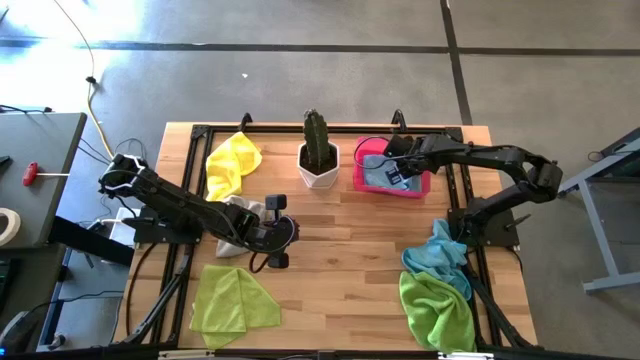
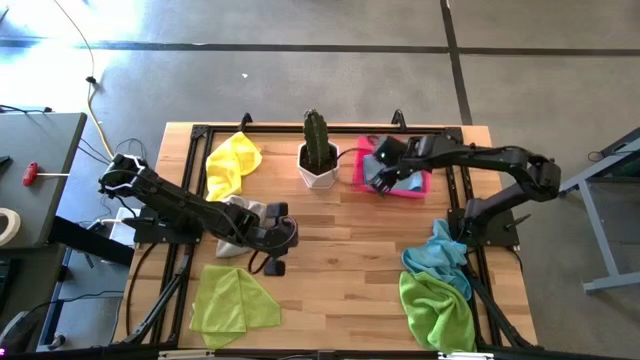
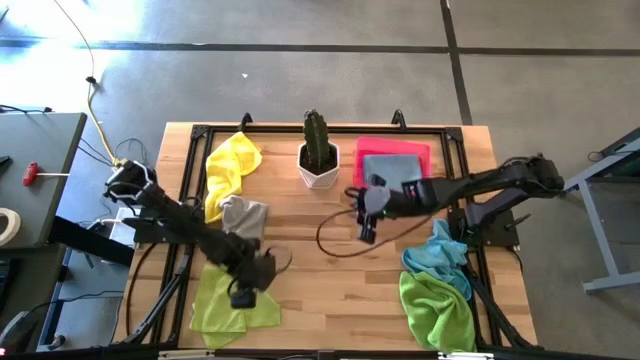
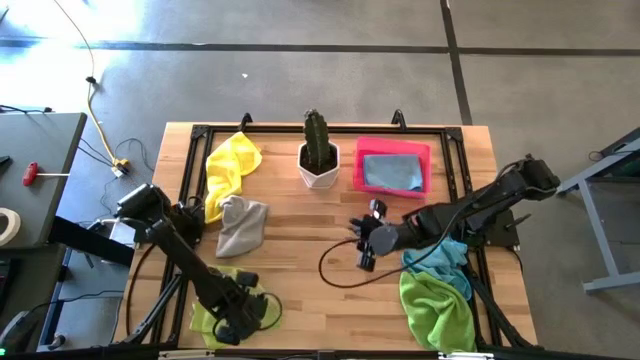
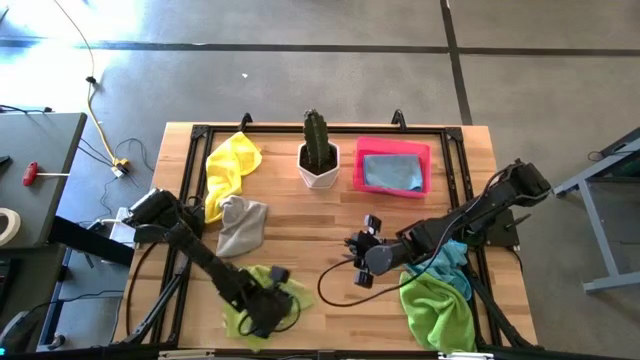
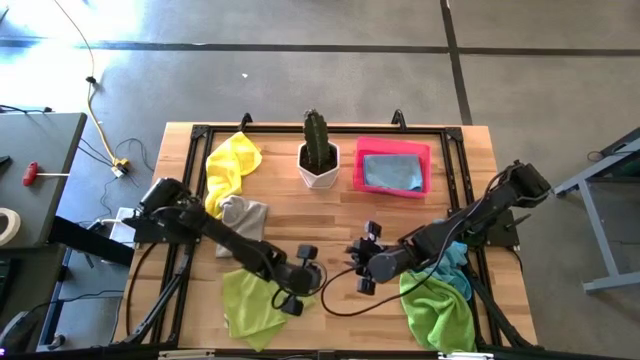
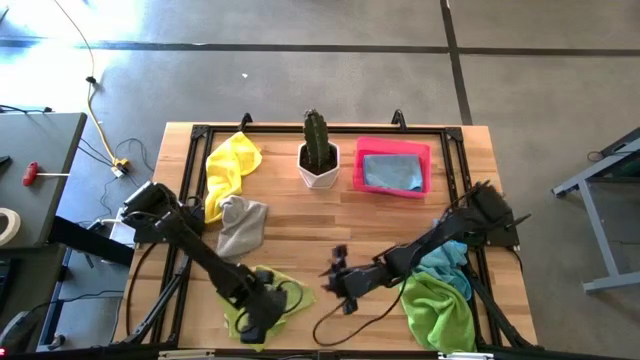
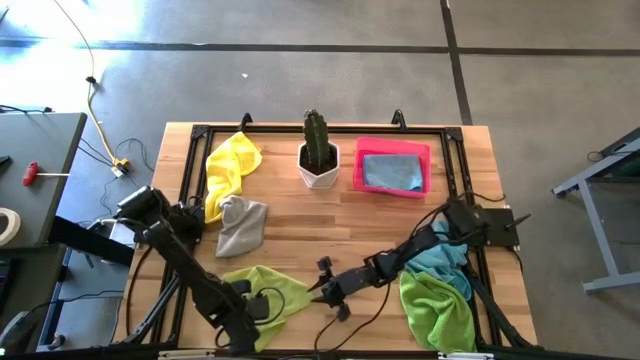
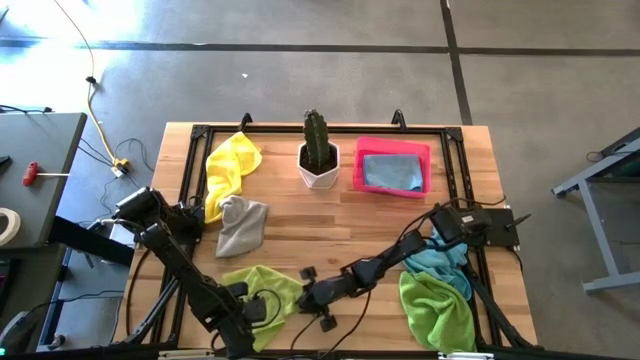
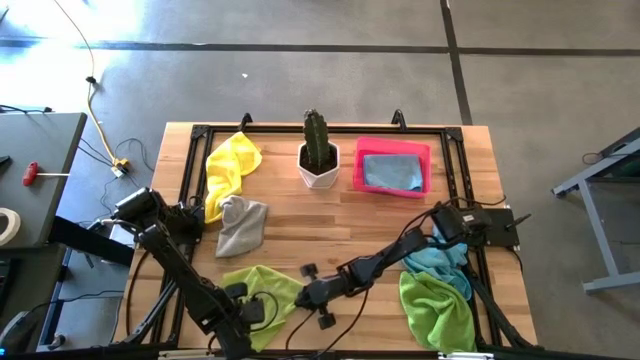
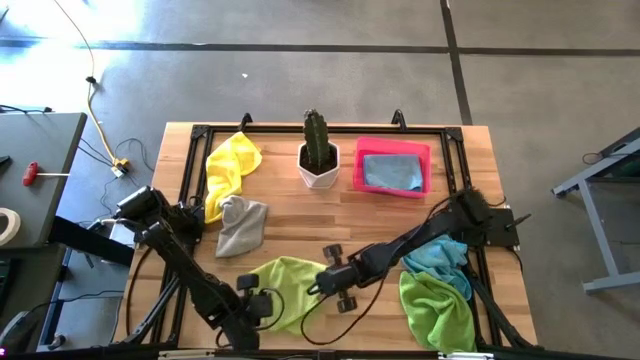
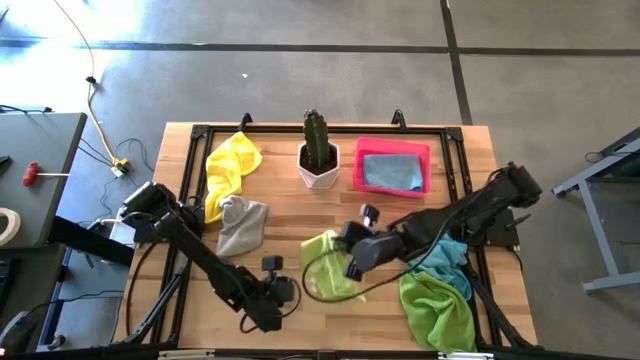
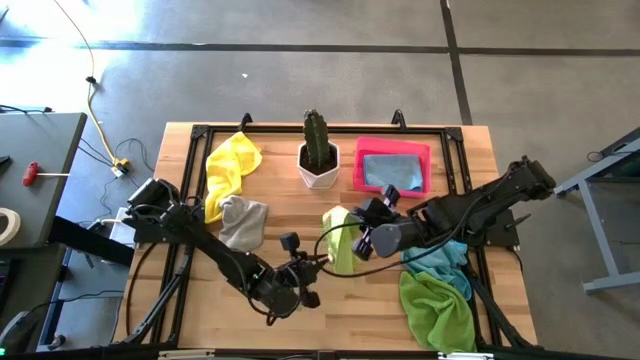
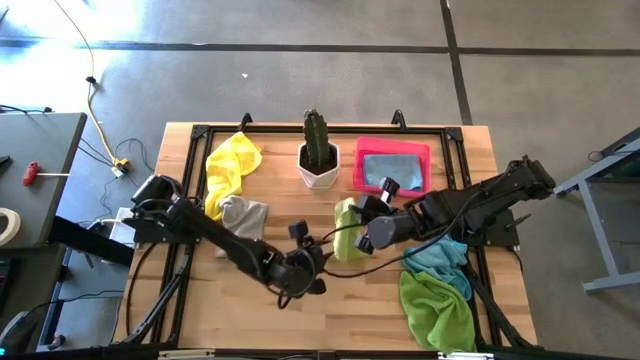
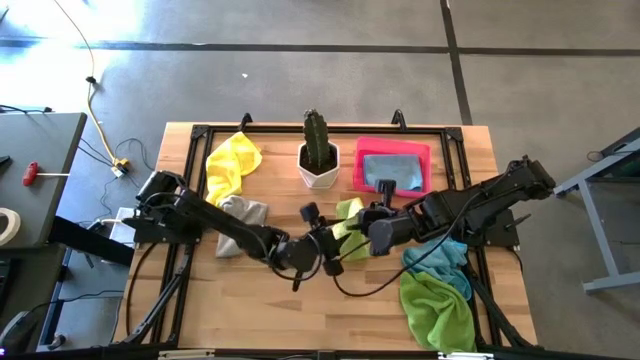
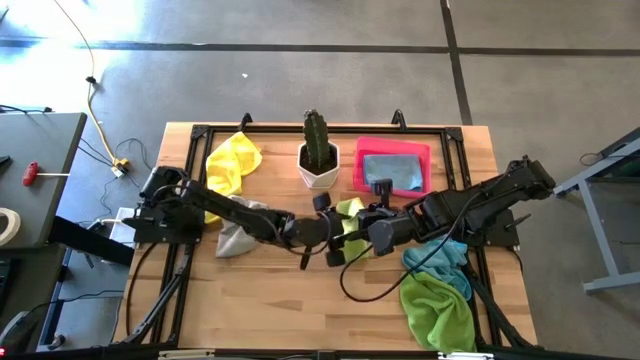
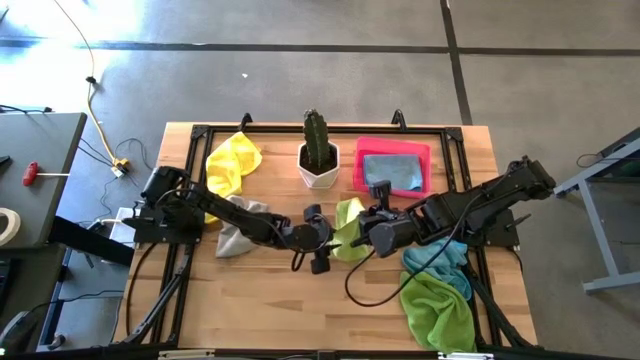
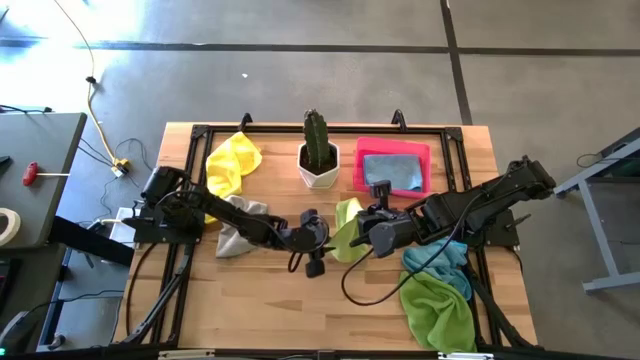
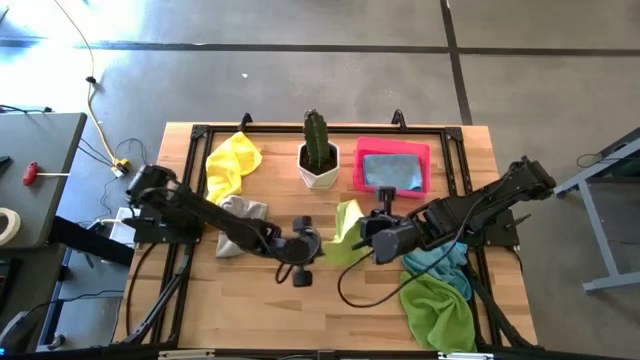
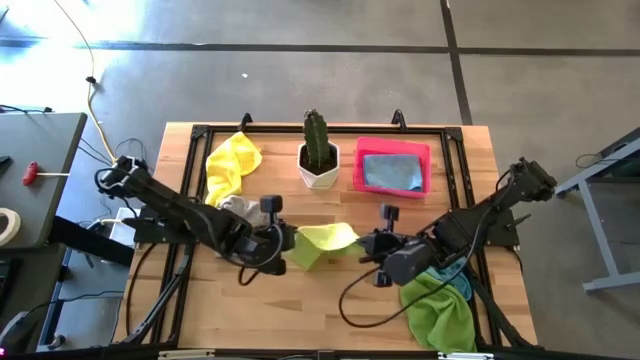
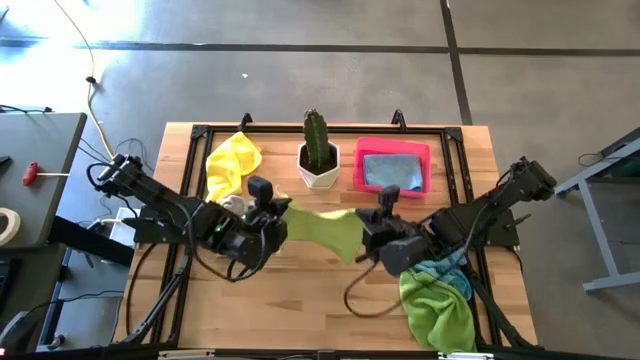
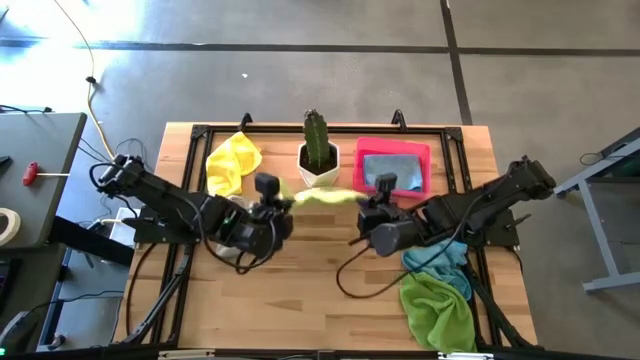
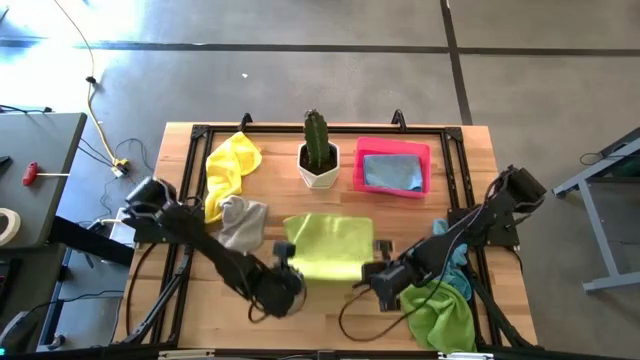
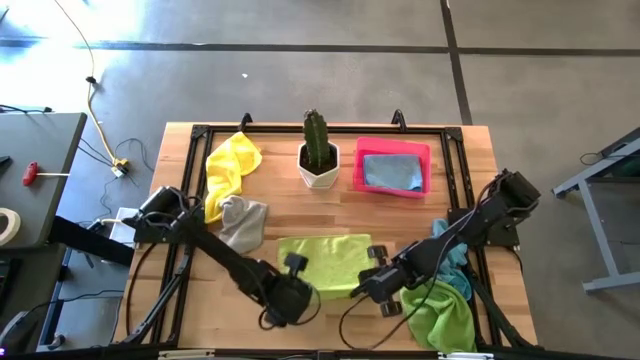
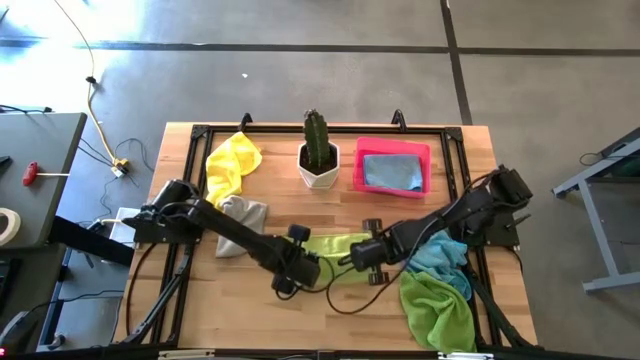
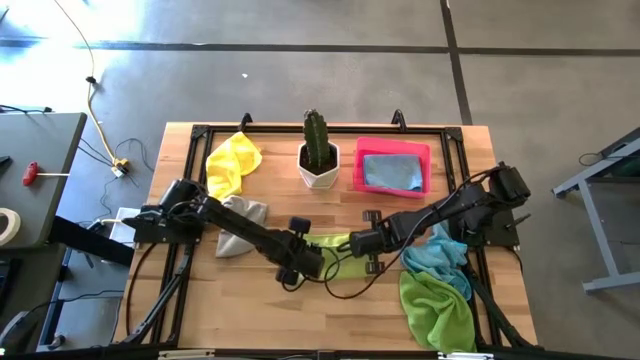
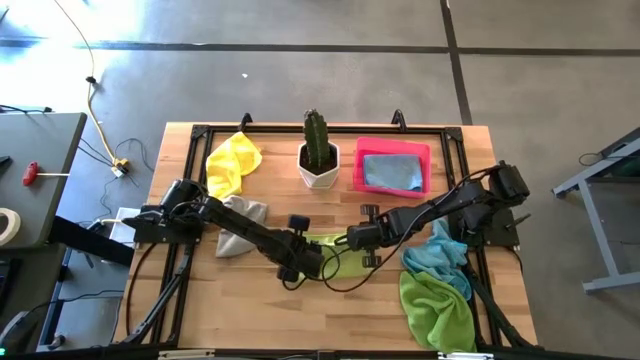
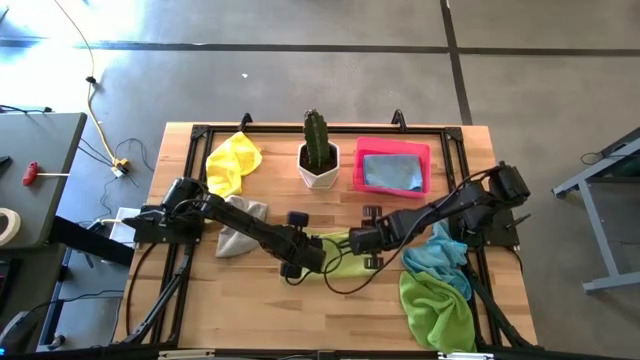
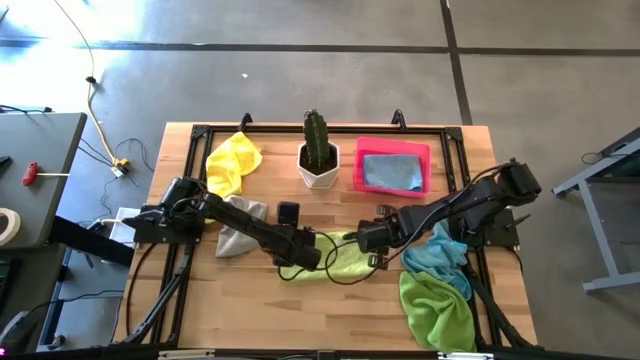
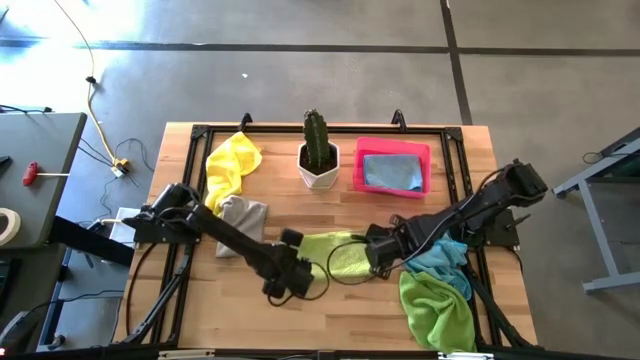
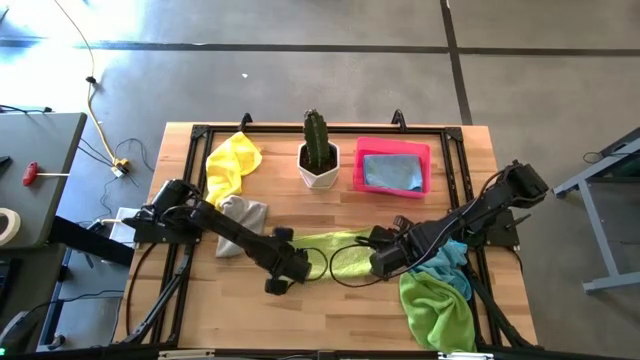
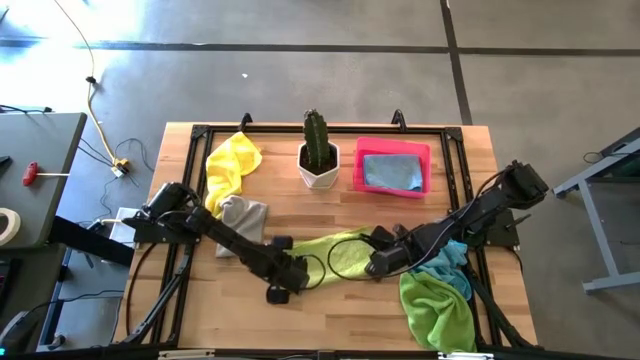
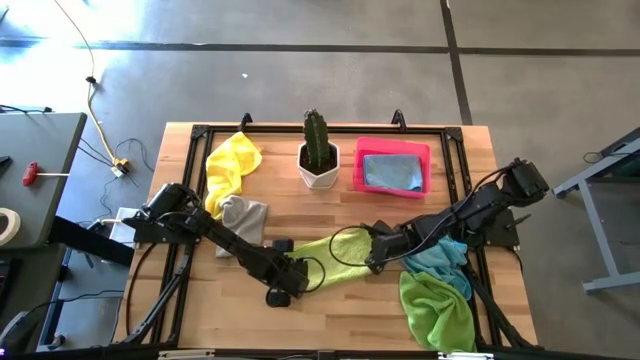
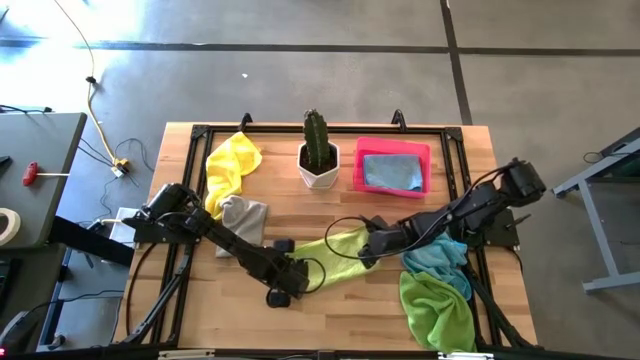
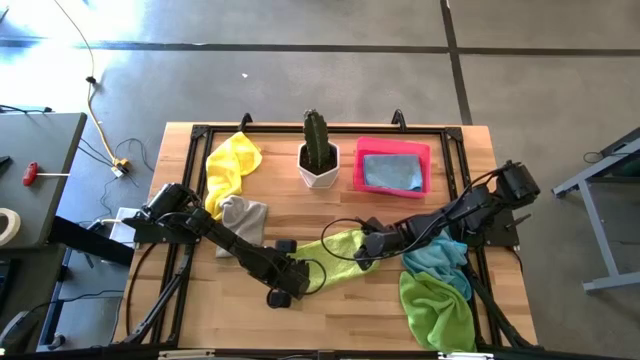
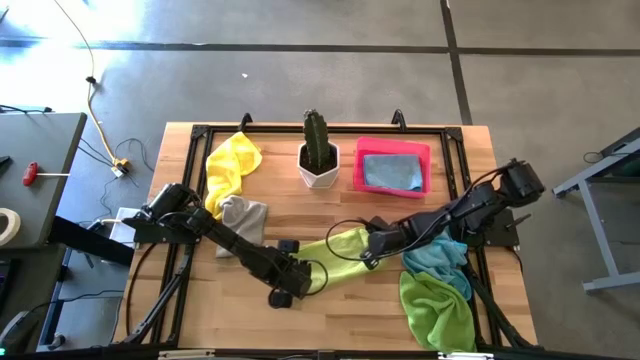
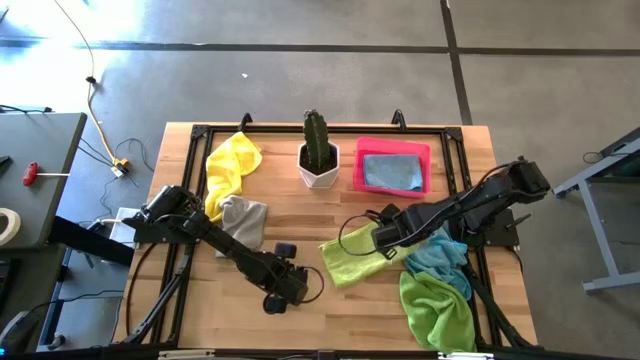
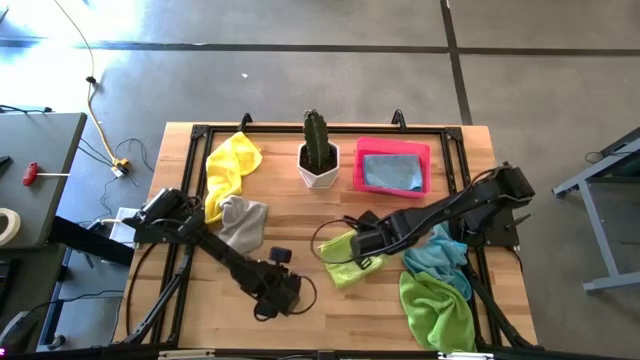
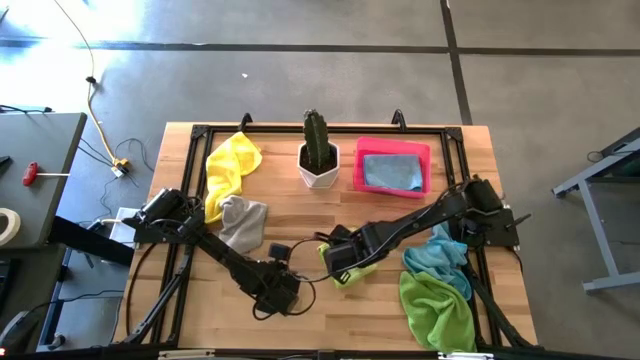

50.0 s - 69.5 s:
Task: Fold microfiber towels
Fold the yellow green towel

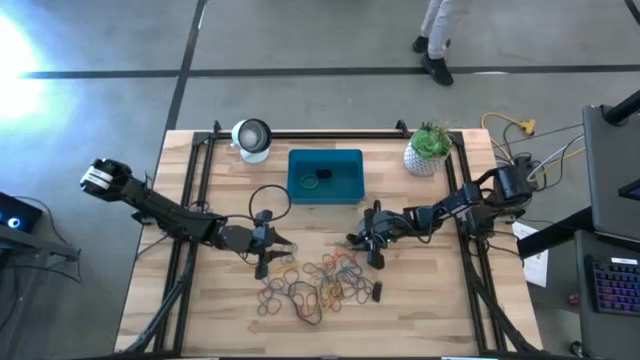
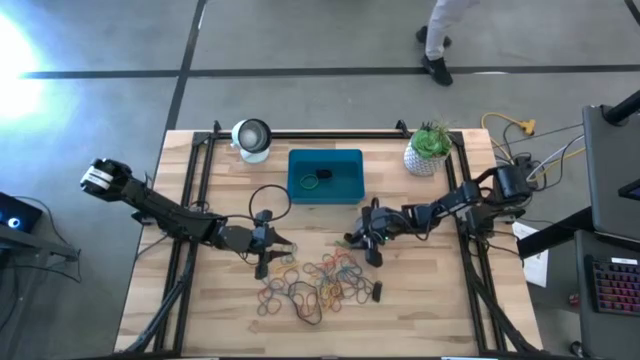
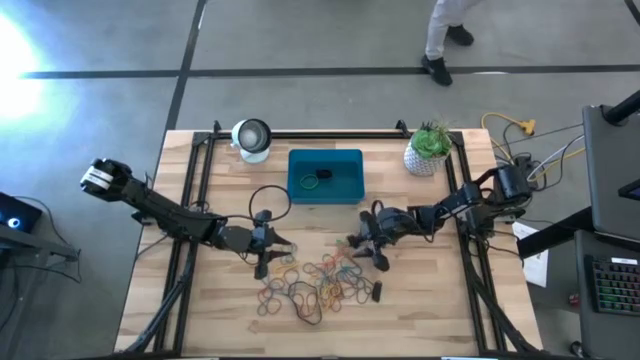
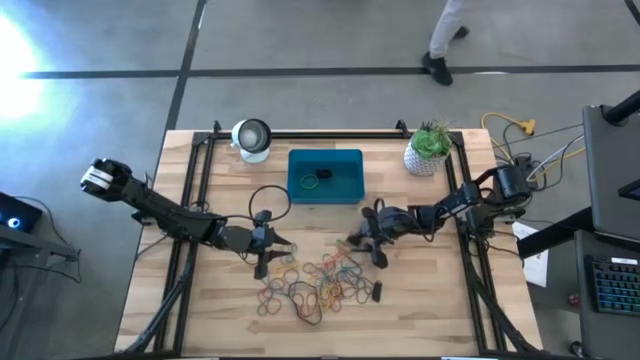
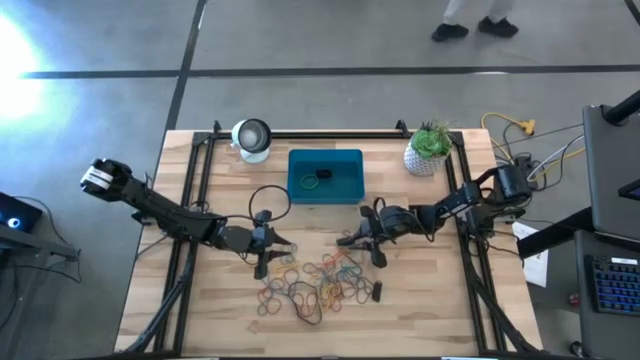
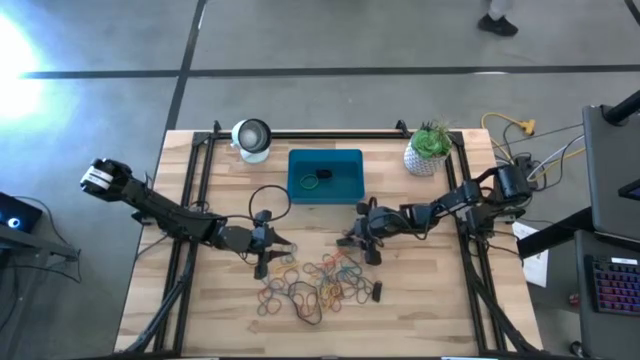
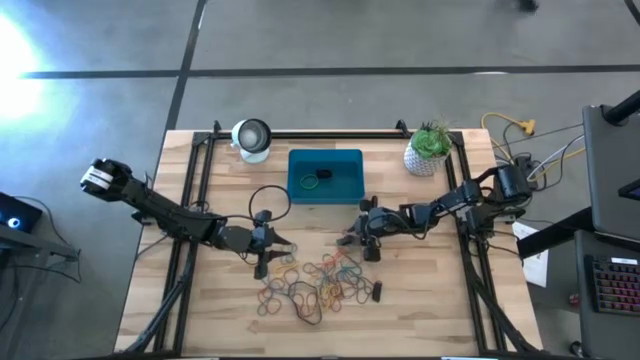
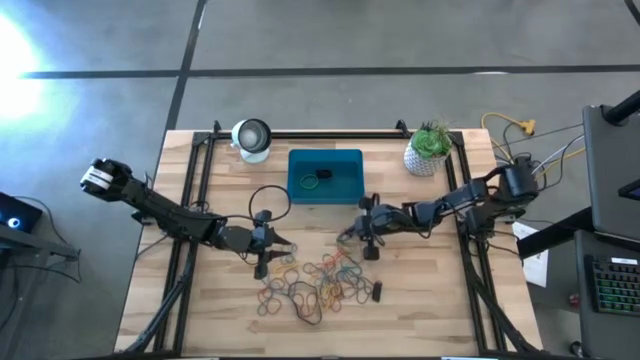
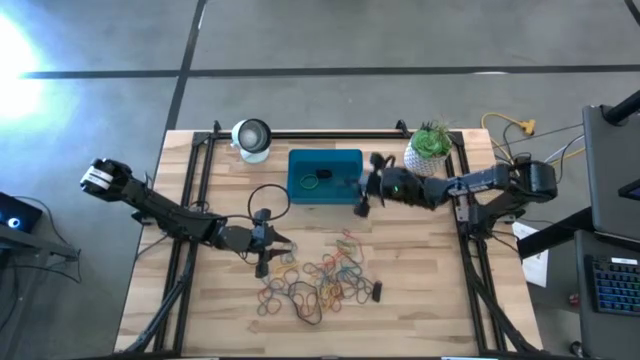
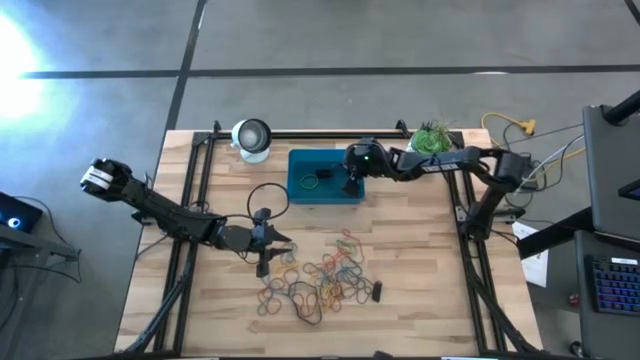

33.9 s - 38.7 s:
Task: Pick and place rubber bands into bin
Put the black rubber band into the bin
